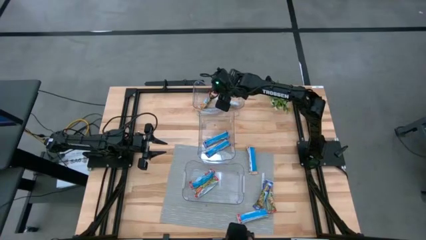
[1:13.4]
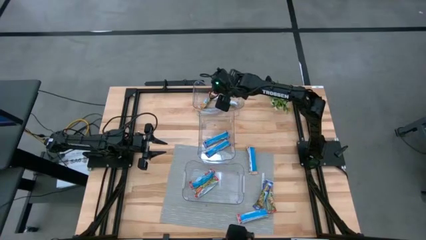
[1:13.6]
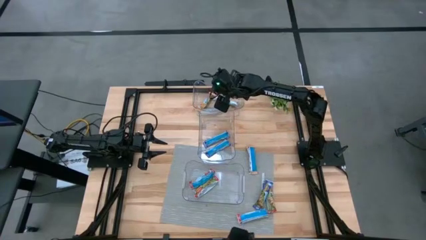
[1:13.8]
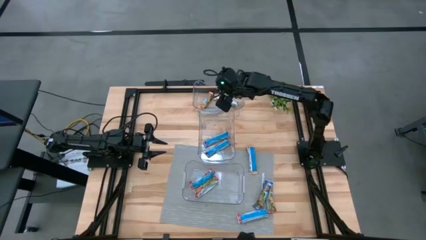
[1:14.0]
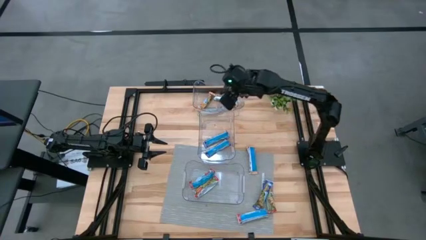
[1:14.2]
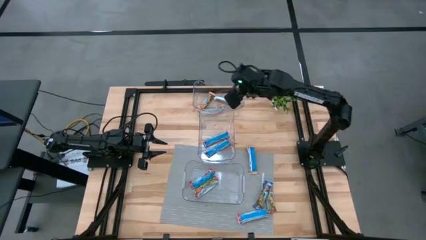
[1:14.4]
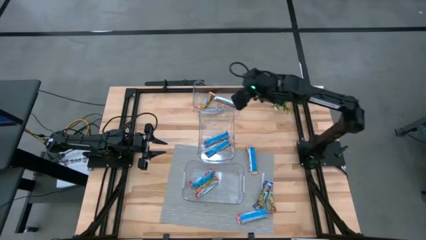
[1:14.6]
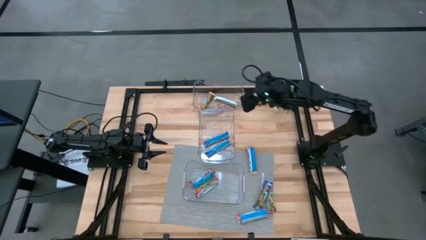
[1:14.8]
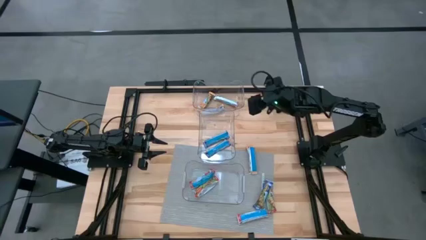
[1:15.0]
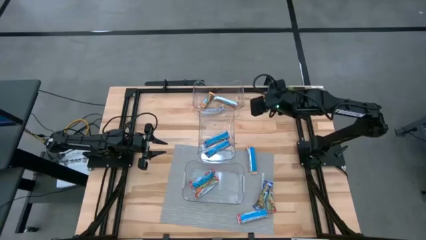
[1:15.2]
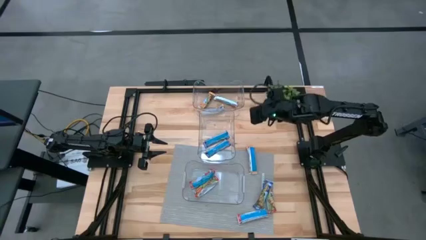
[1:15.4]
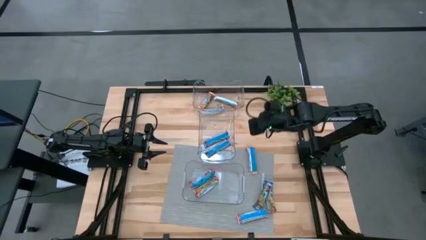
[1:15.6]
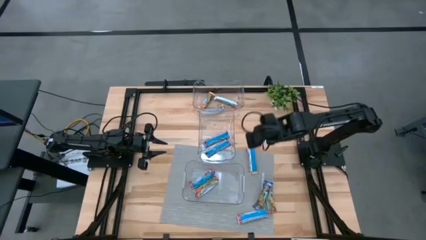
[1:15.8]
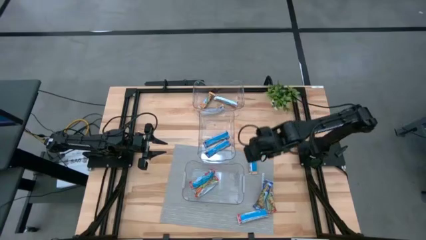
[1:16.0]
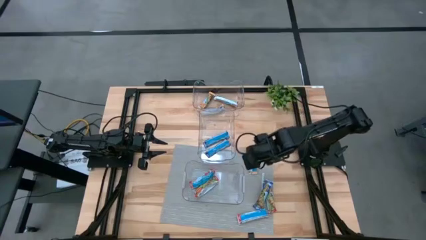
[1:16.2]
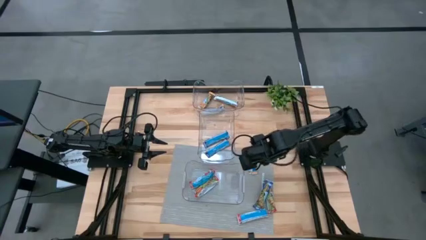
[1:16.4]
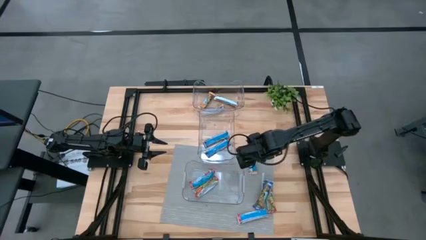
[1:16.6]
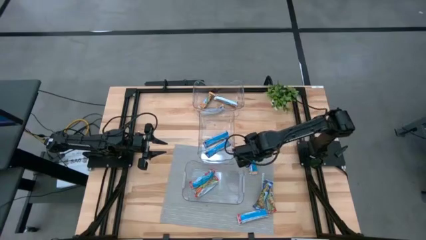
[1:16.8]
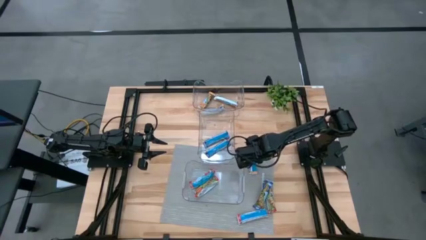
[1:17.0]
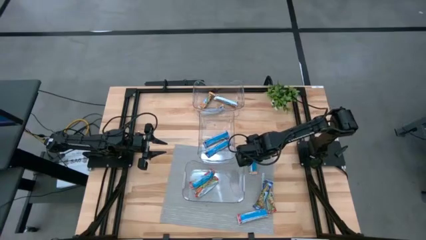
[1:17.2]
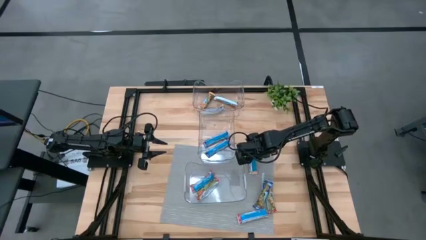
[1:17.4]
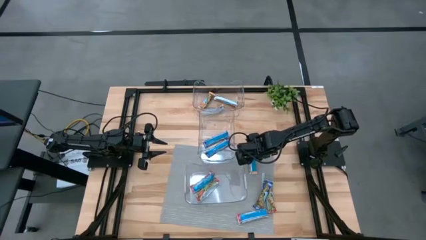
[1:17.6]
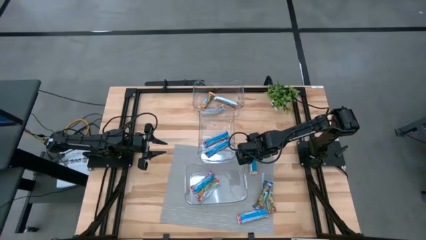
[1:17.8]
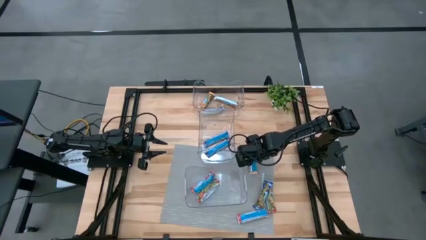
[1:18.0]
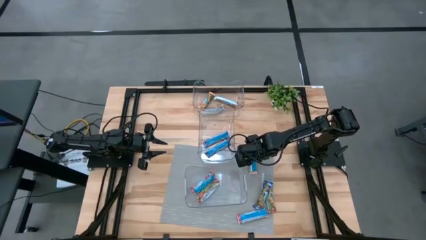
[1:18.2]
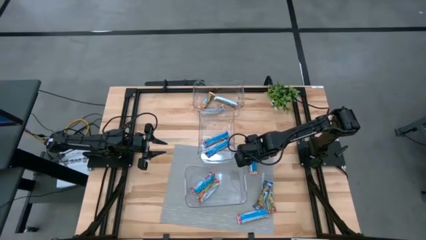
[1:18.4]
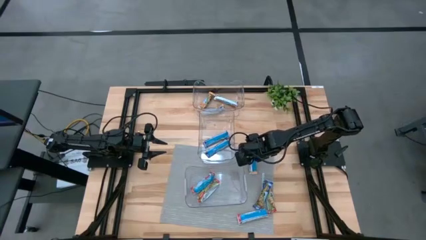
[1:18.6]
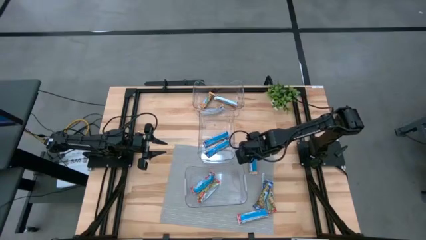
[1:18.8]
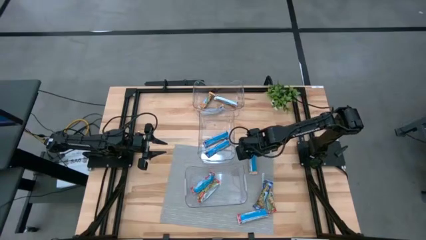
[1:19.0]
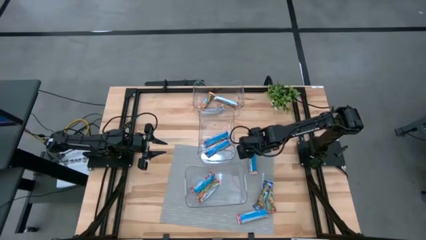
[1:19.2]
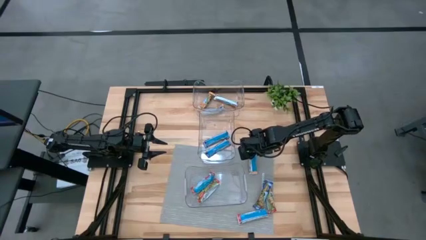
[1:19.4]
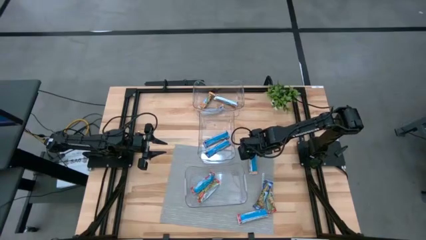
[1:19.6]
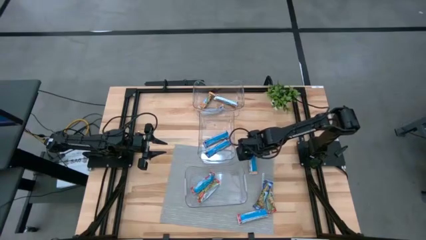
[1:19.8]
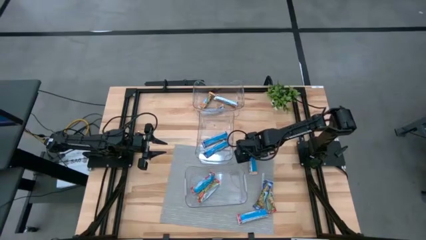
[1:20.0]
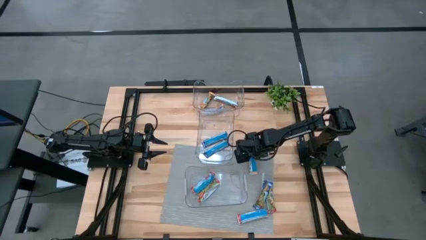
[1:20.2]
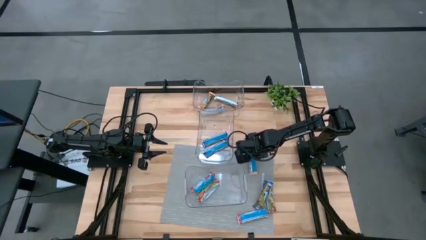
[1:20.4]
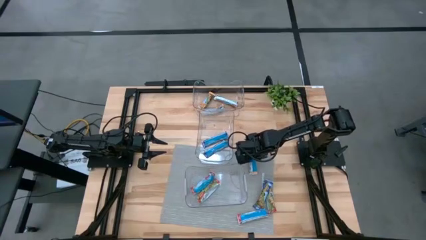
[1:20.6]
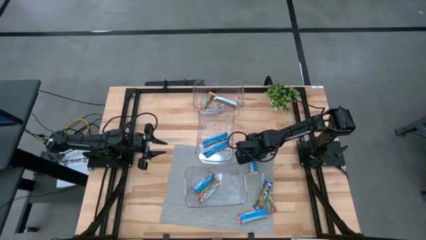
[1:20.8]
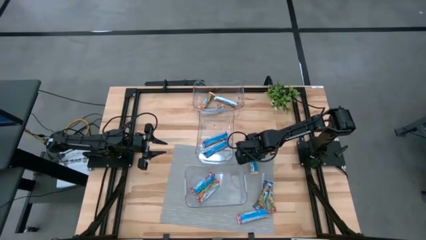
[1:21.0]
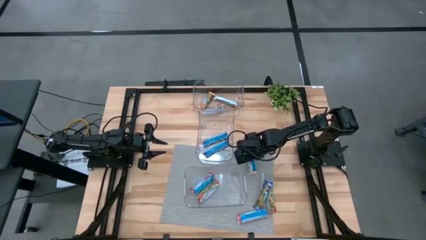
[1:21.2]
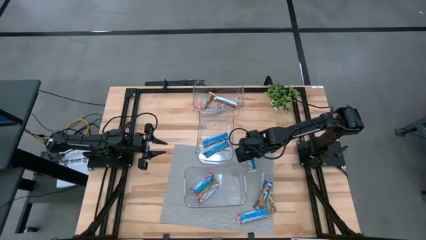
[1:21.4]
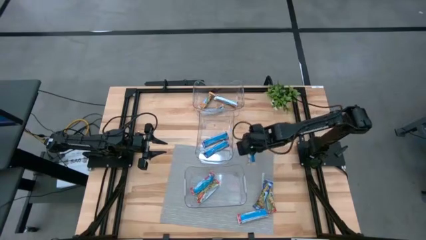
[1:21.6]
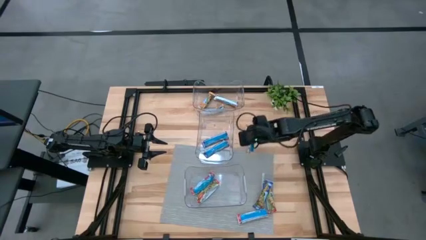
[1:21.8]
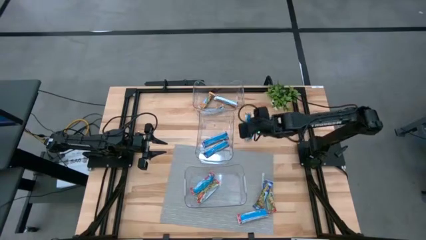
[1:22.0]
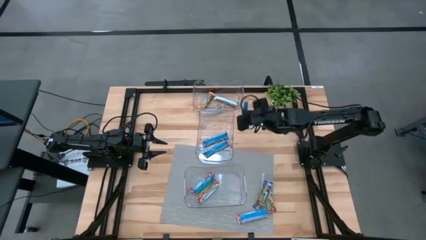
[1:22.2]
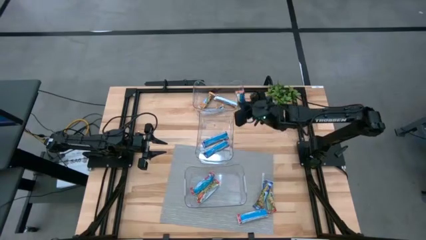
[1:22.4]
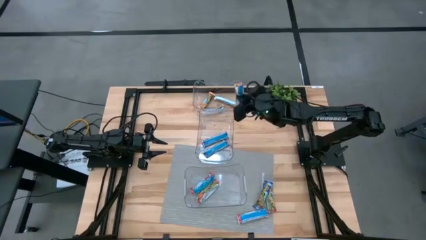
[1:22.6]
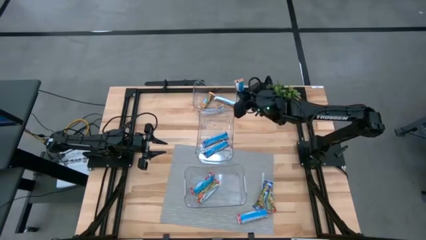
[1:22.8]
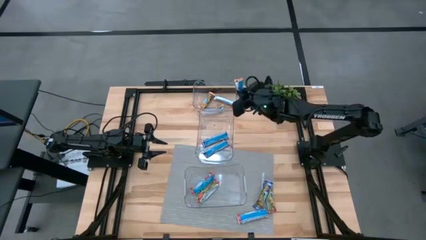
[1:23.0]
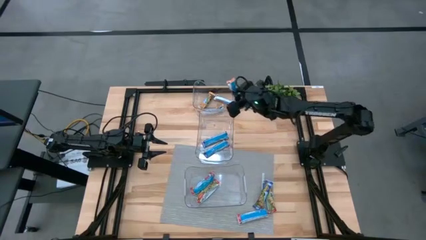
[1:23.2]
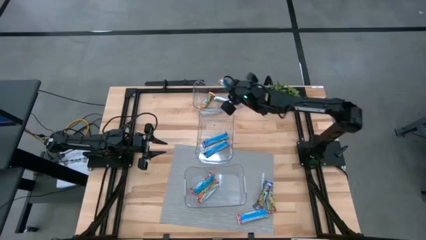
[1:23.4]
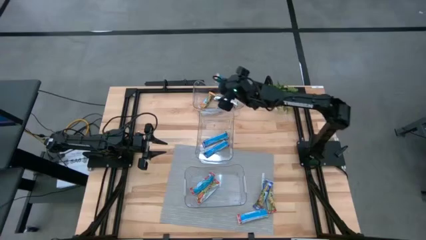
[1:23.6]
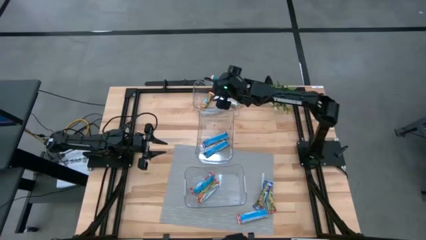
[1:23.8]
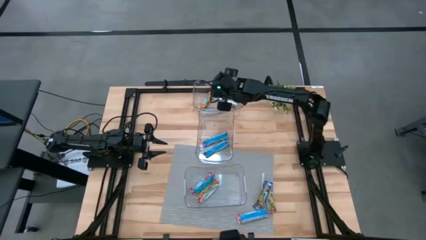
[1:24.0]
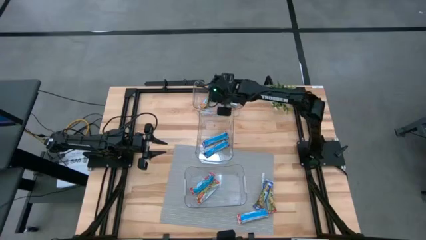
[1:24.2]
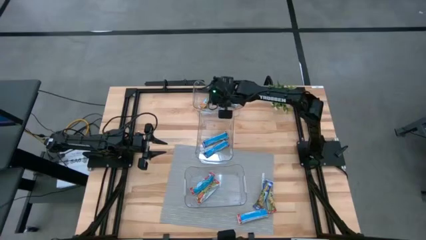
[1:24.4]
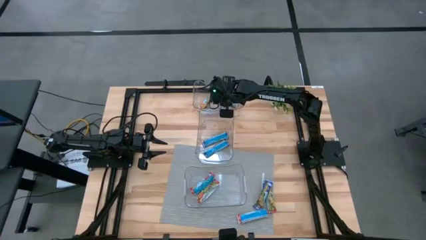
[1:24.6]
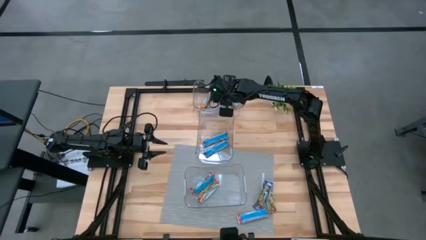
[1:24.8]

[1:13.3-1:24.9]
Task: Pick and place Granola Bars by type
Put the yellow granola bar into the top transparent bin

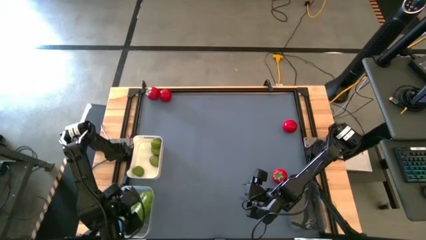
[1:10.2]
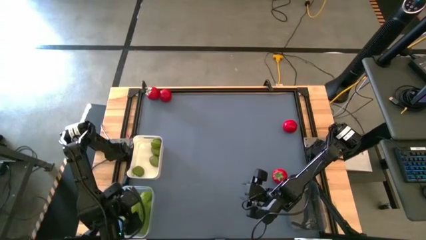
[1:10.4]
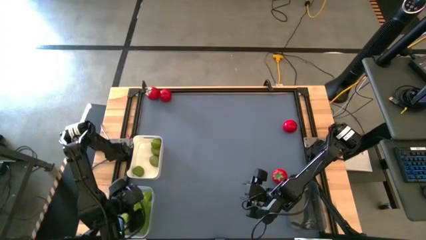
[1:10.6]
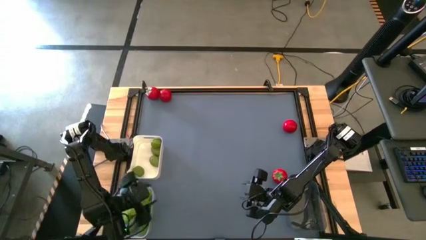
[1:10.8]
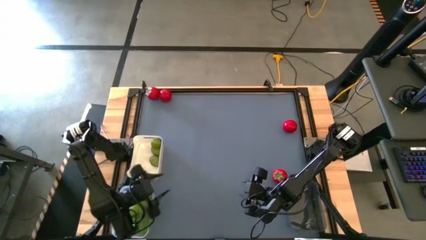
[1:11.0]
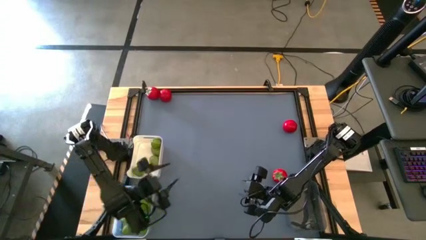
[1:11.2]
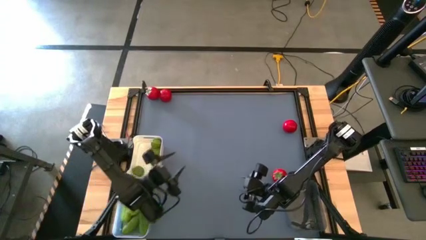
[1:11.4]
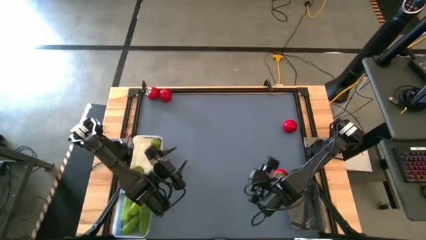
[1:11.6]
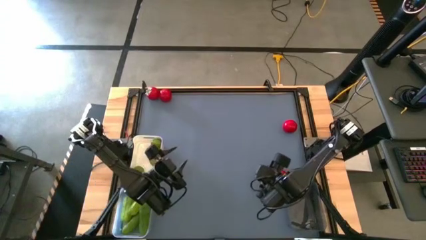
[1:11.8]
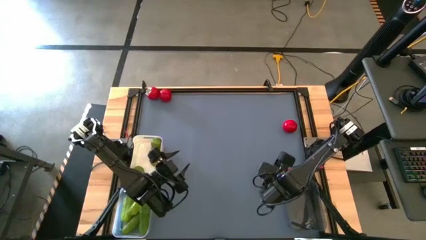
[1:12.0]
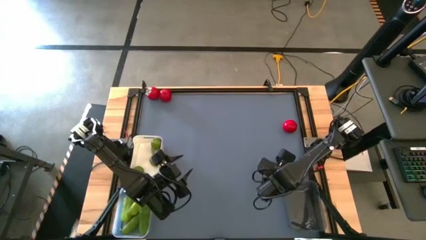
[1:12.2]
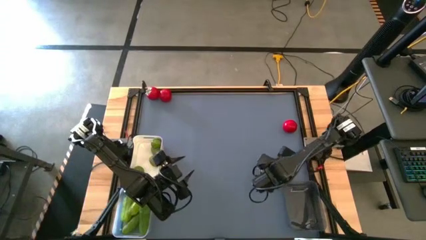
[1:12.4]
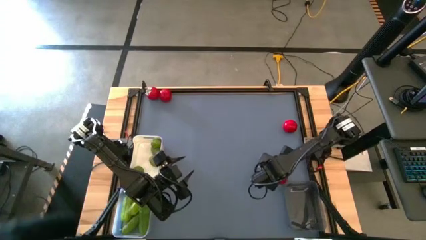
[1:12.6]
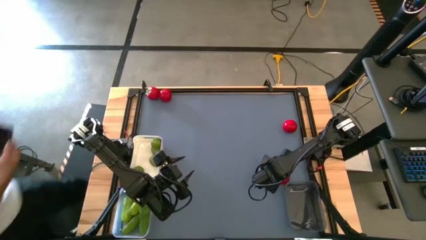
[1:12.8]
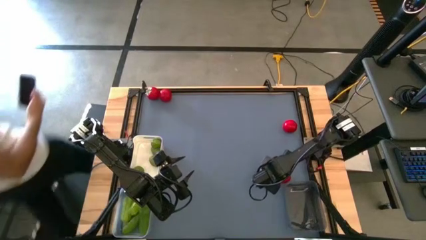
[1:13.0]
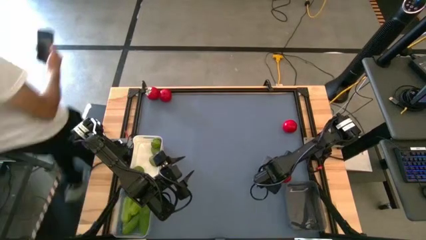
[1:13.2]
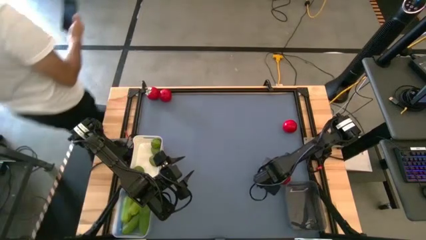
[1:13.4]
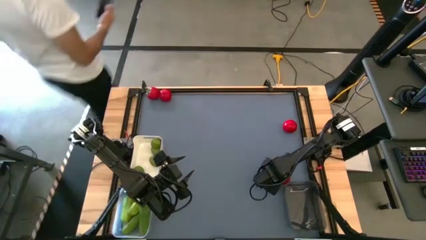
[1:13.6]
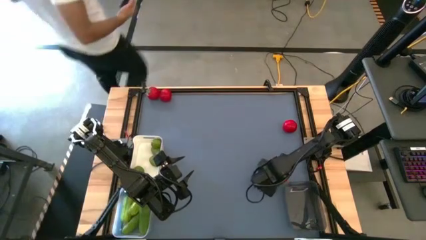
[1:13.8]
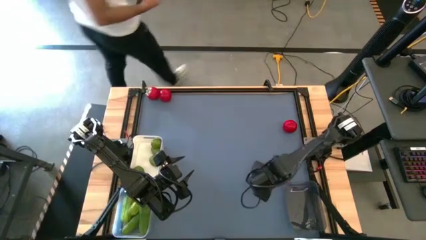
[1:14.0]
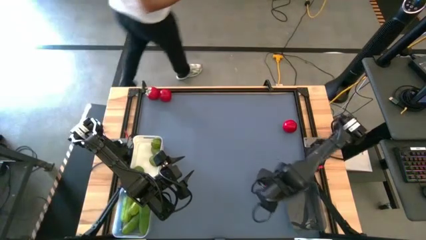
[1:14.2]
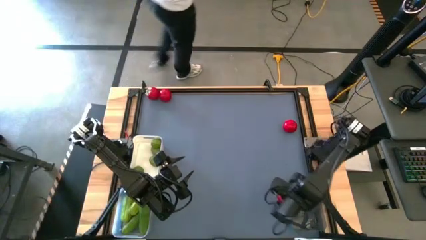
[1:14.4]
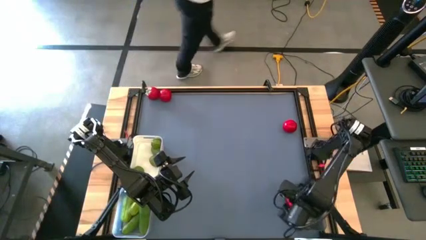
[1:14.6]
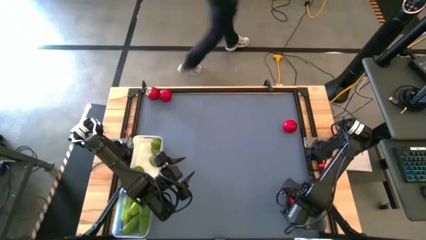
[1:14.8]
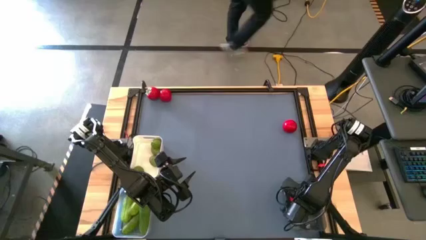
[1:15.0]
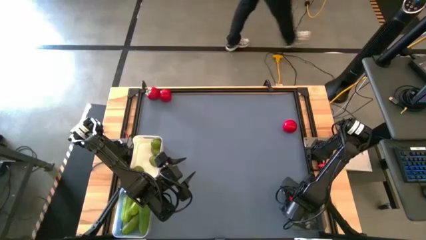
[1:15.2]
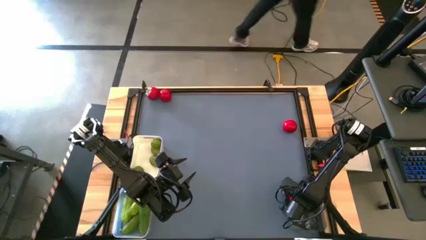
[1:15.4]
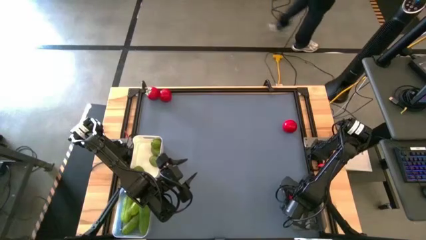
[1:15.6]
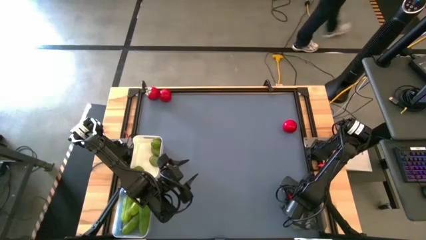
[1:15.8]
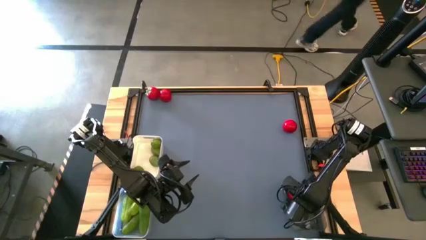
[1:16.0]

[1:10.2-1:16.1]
Task: Sort produce into baskets
Put the red tomato into the black bin
